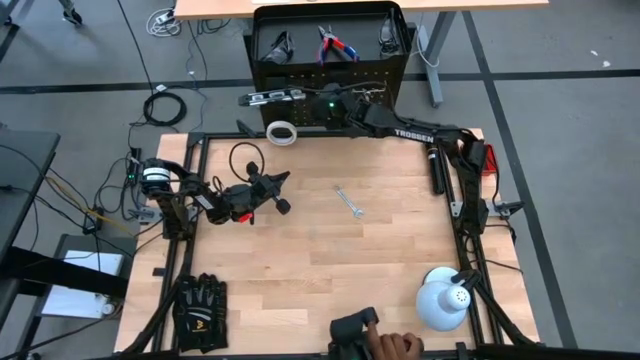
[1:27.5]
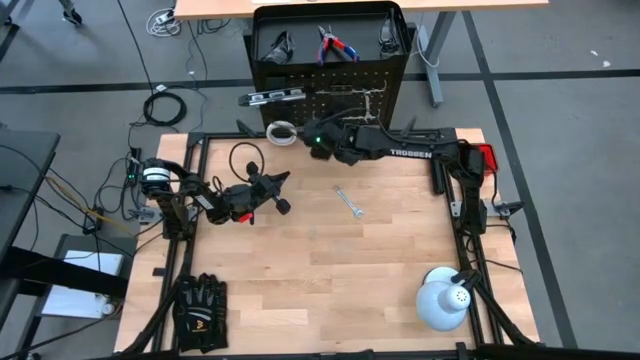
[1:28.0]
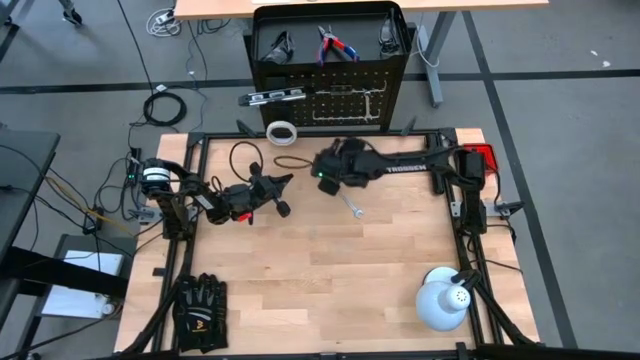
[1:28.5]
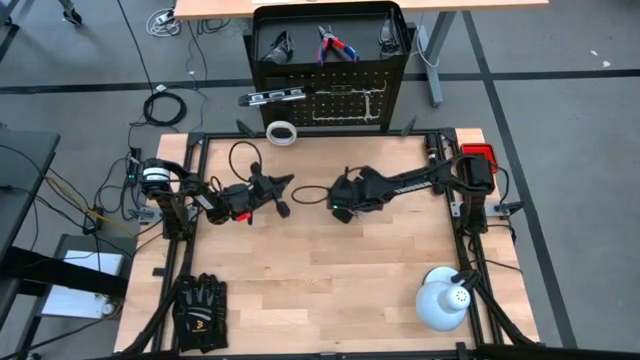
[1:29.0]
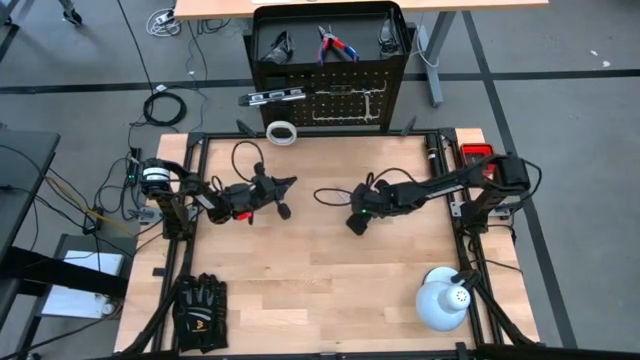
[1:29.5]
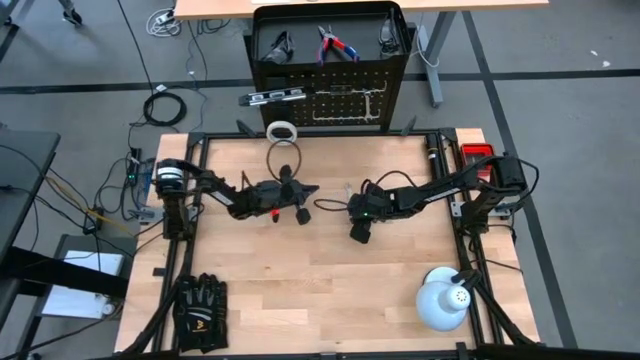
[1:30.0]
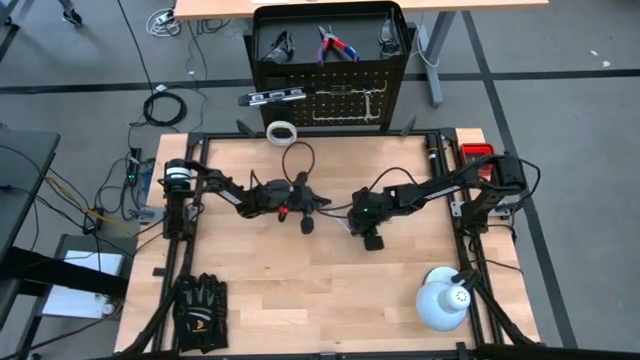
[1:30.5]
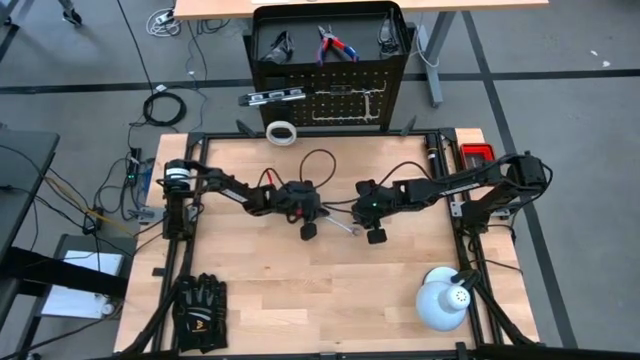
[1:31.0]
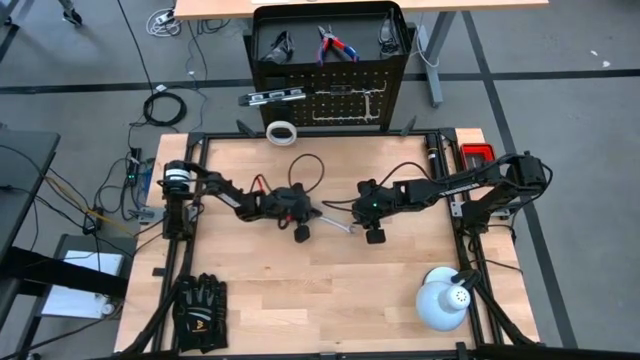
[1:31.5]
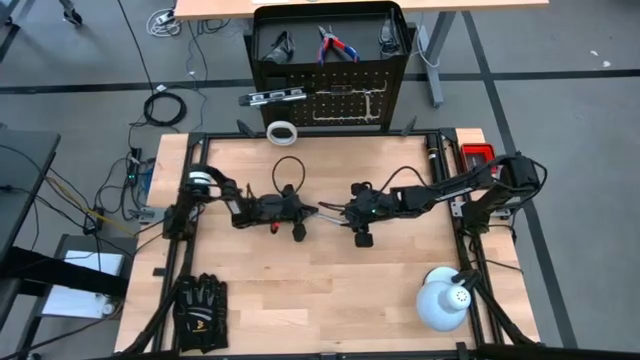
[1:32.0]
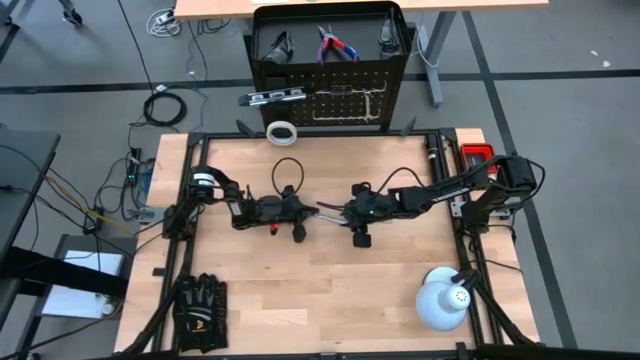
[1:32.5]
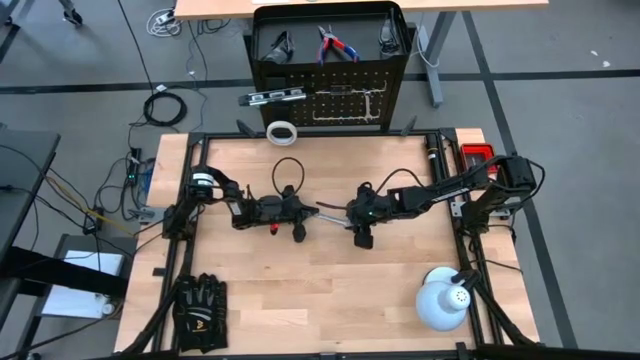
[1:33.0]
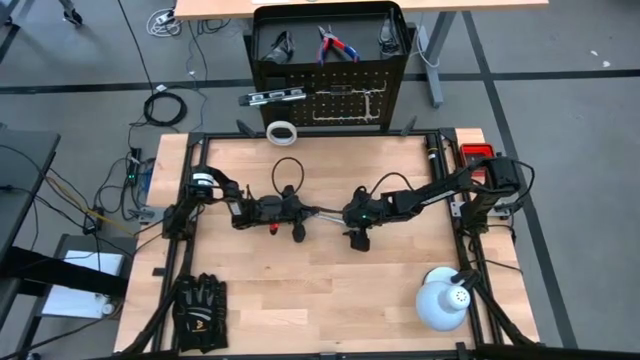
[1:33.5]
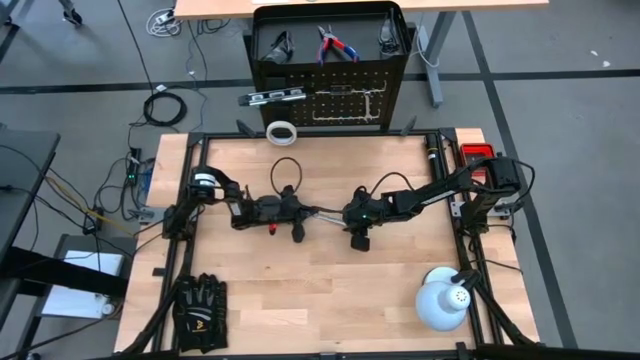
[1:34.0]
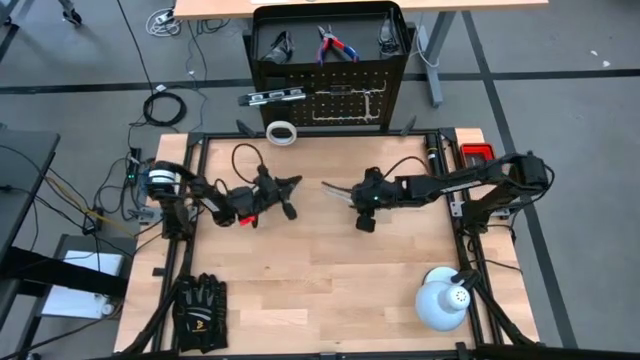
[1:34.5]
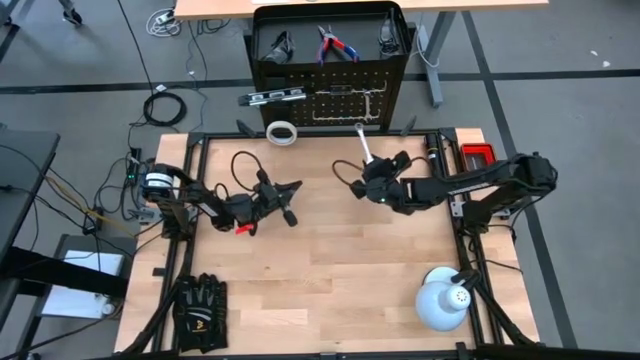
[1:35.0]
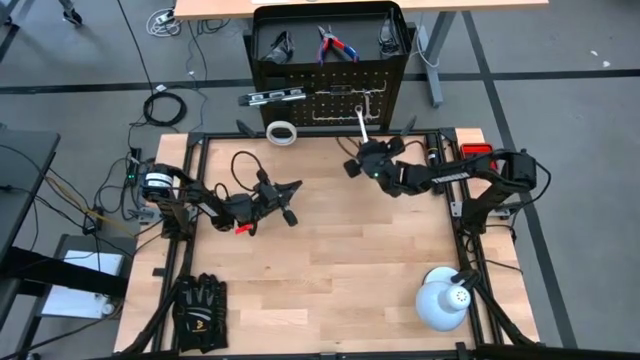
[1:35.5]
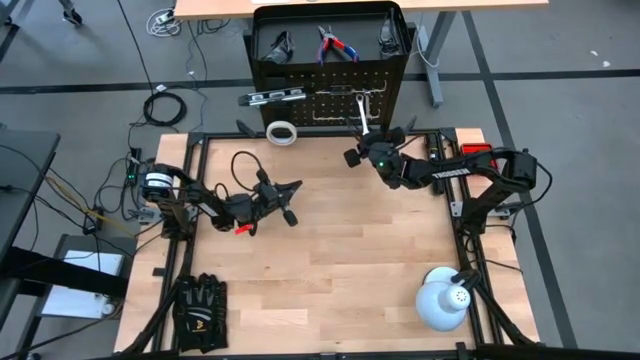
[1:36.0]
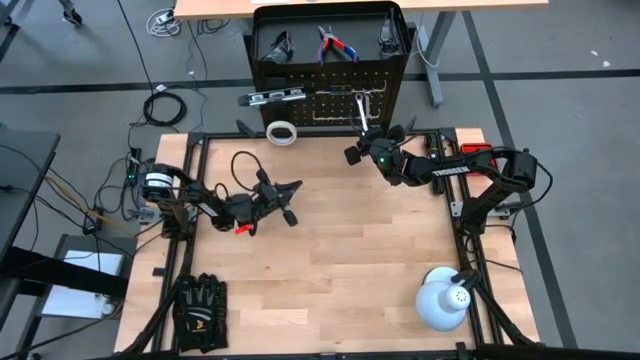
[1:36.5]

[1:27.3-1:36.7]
Task: Hang tools onto peg board
Hang the silver wrench on the peg board

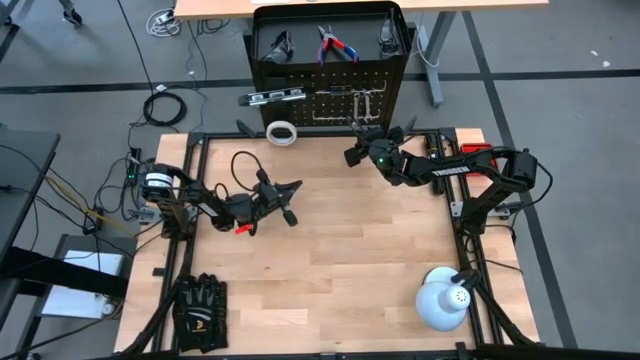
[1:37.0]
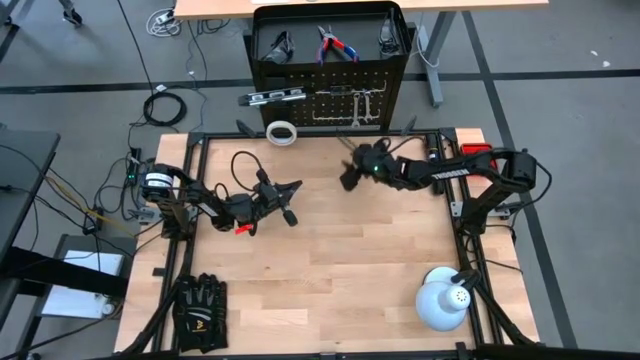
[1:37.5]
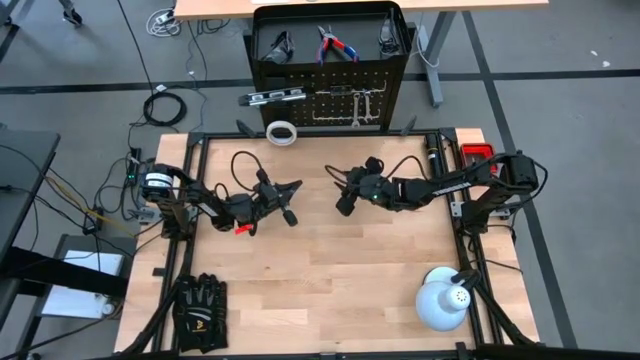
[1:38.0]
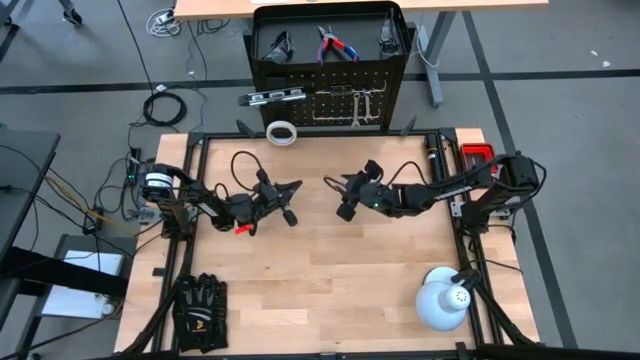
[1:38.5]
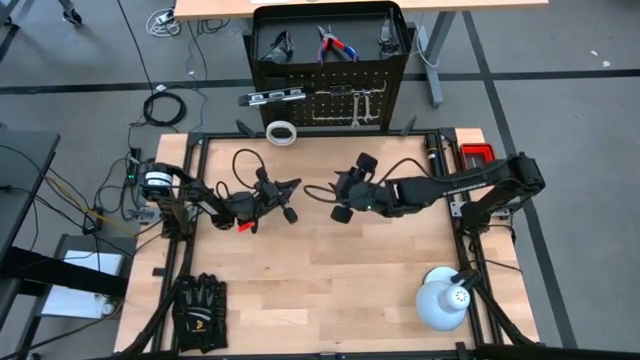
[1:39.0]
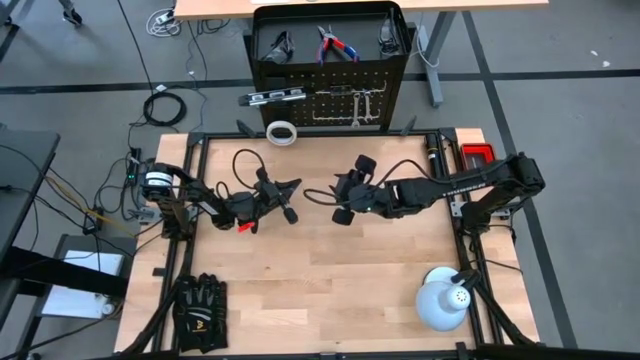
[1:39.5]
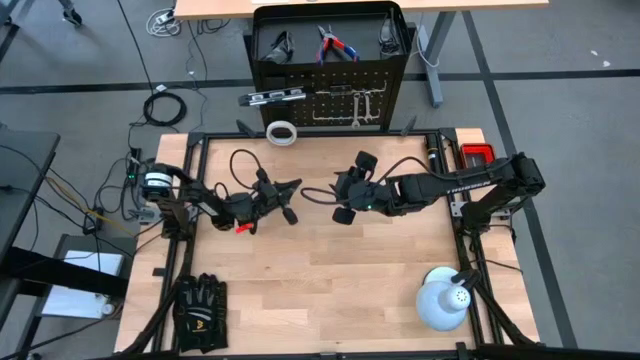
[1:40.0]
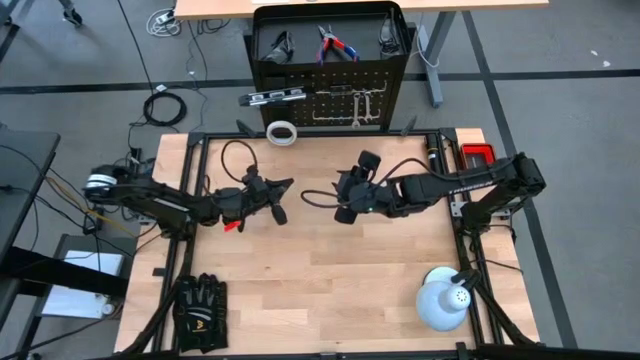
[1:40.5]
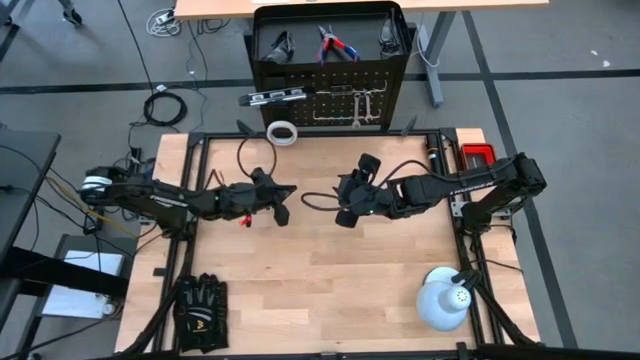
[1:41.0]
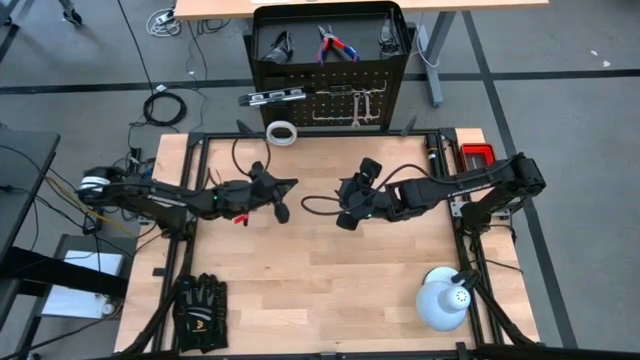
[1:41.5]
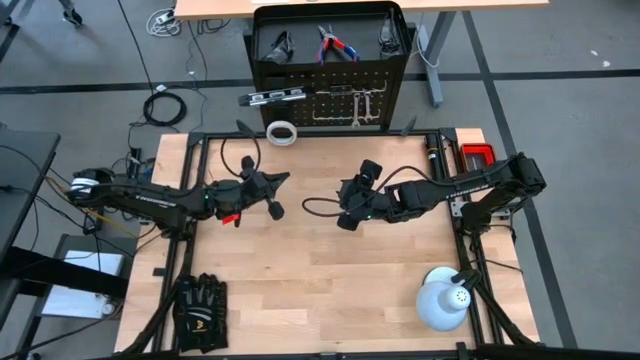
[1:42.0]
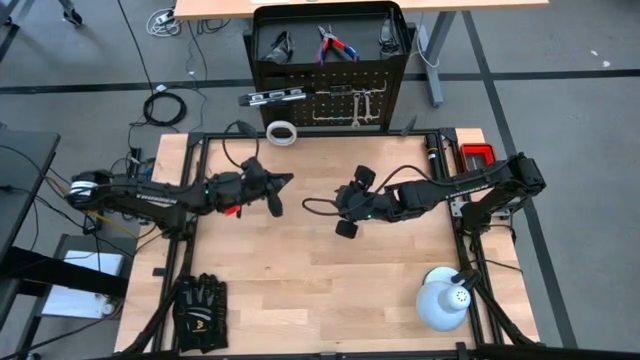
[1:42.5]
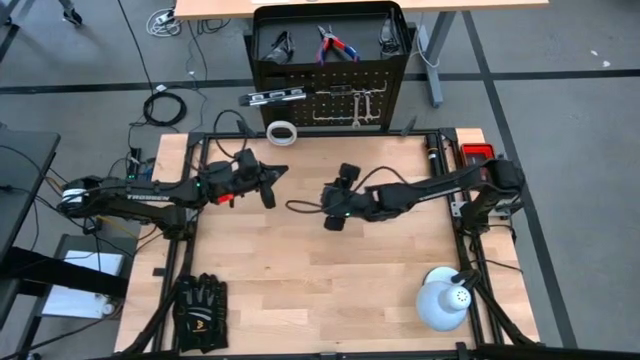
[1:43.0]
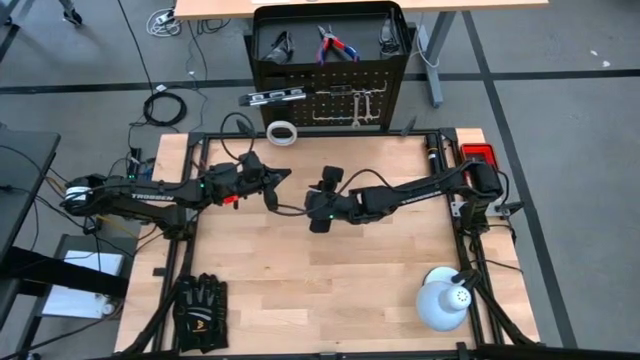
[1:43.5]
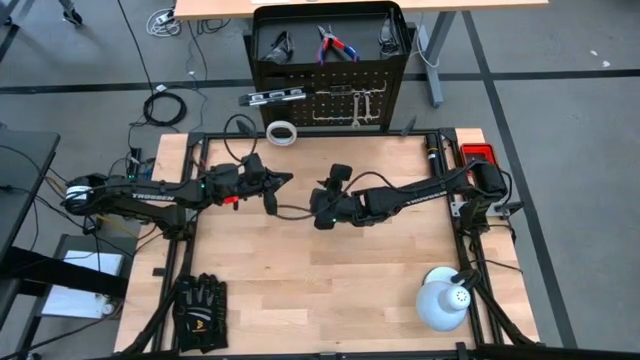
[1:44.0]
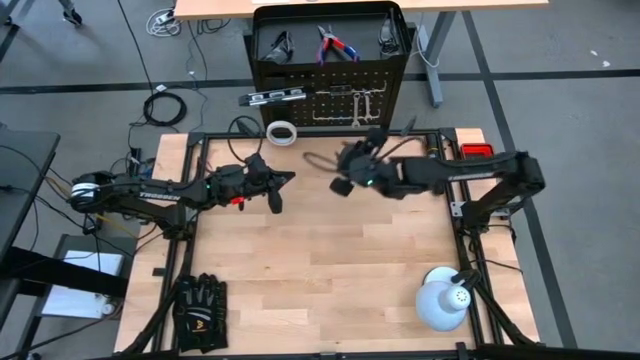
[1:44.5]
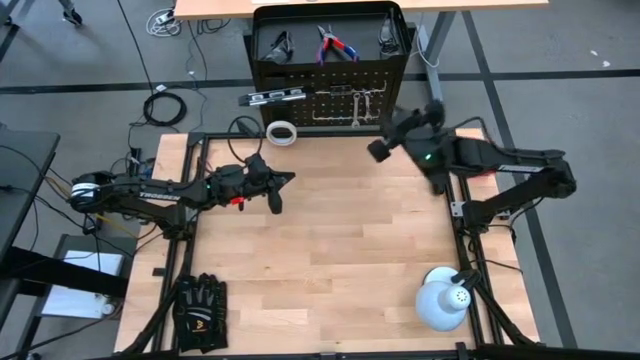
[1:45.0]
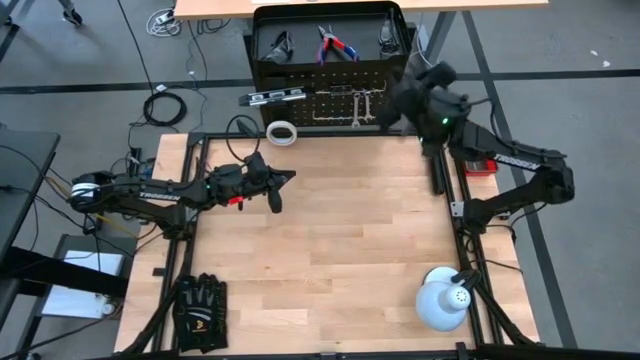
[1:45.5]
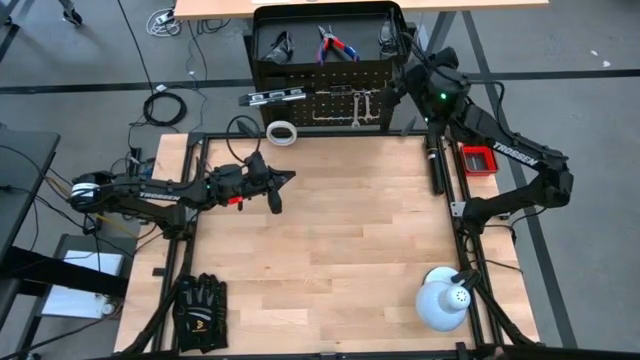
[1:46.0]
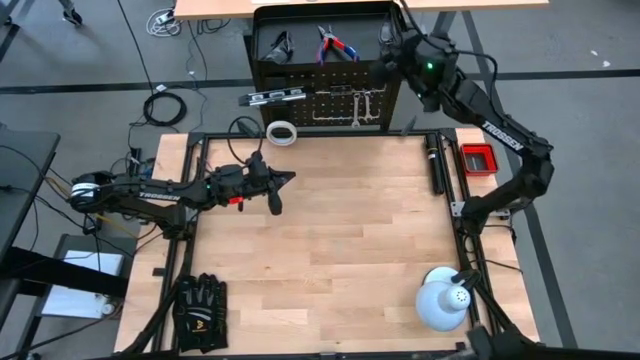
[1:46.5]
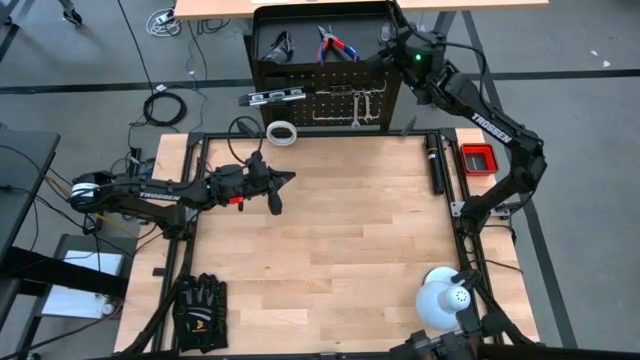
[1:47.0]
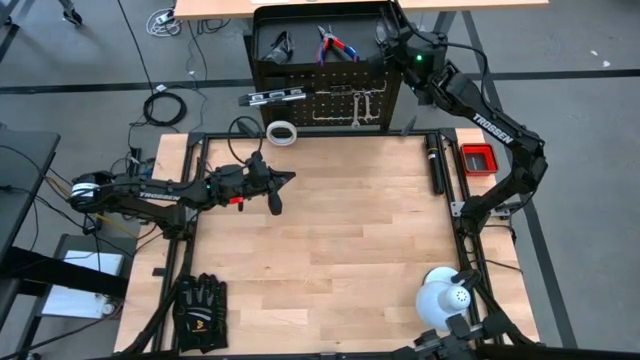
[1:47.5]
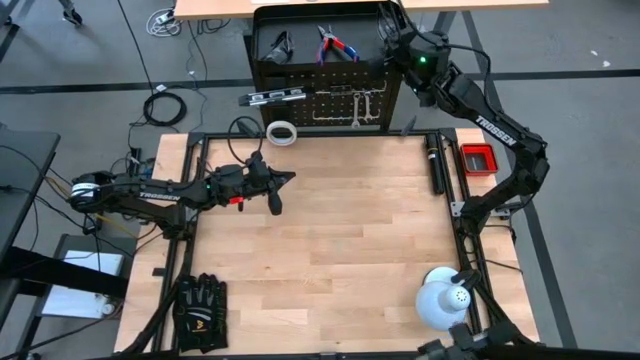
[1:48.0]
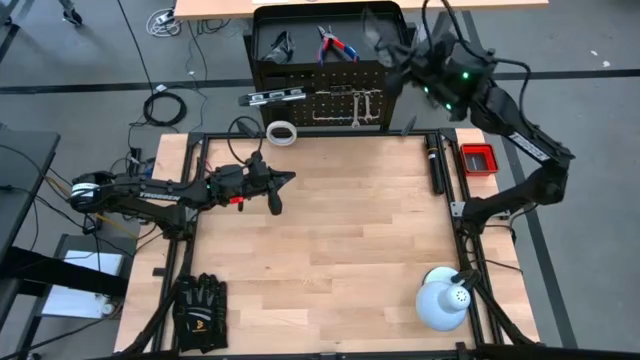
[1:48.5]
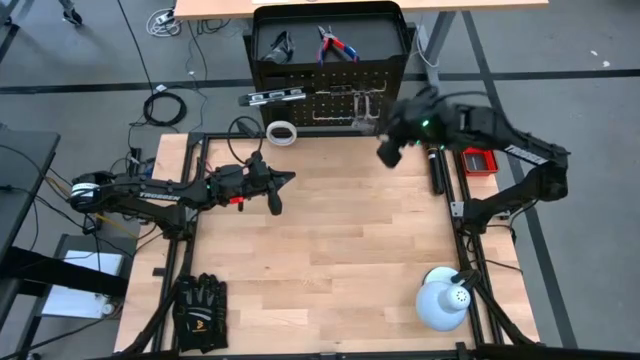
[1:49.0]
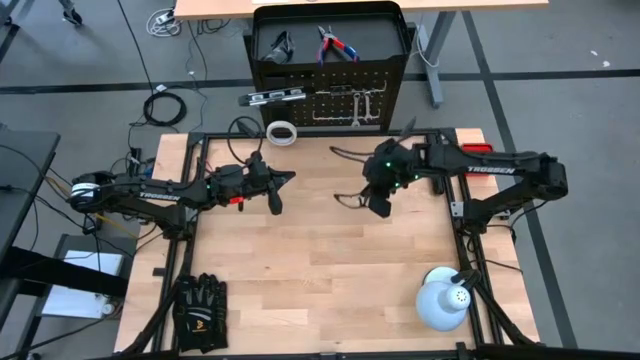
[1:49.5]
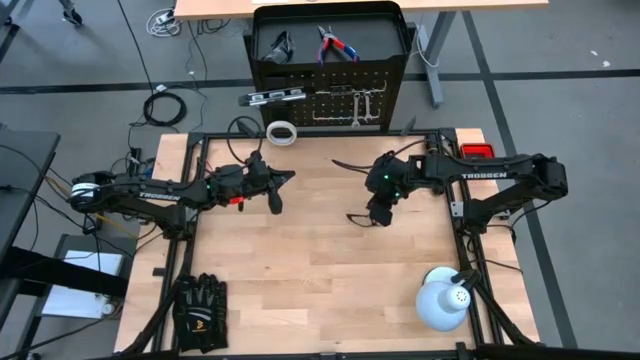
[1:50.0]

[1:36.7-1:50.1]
Remove the right black safety glass from the peg board
